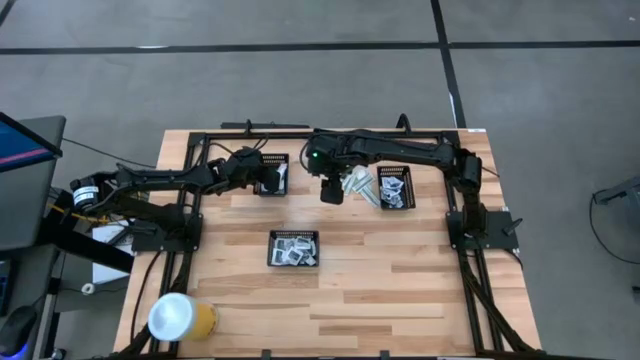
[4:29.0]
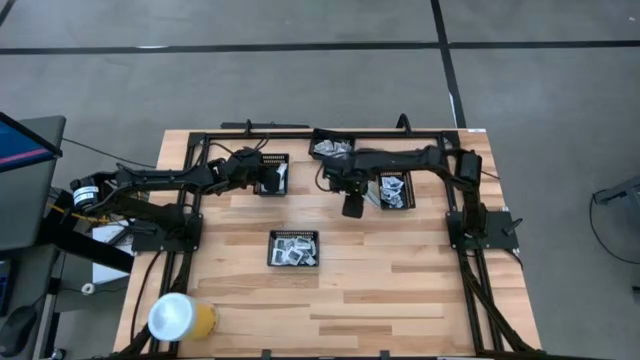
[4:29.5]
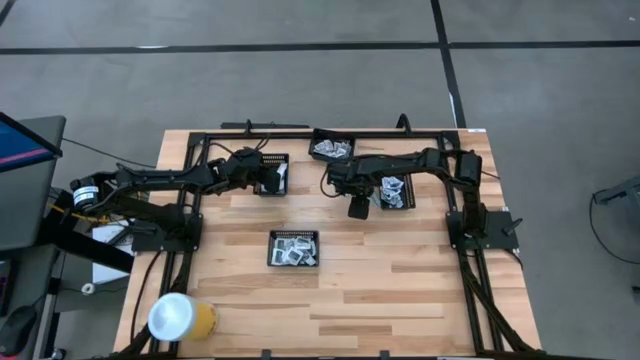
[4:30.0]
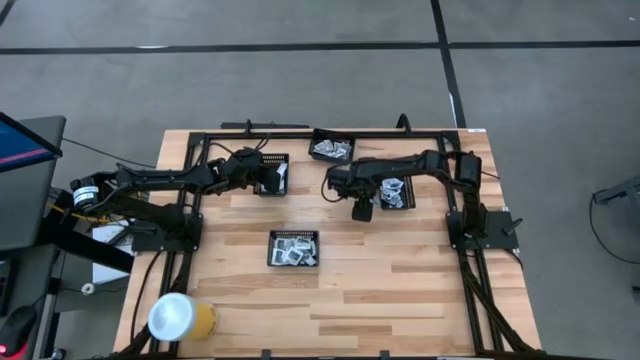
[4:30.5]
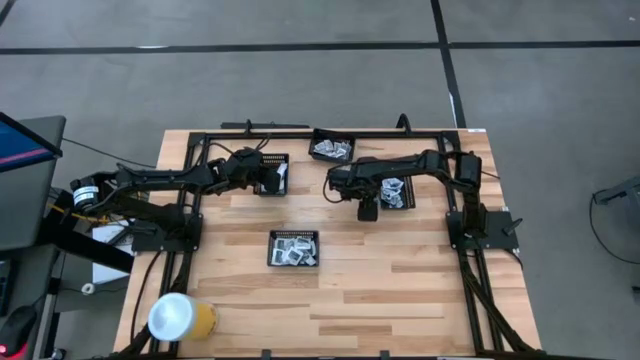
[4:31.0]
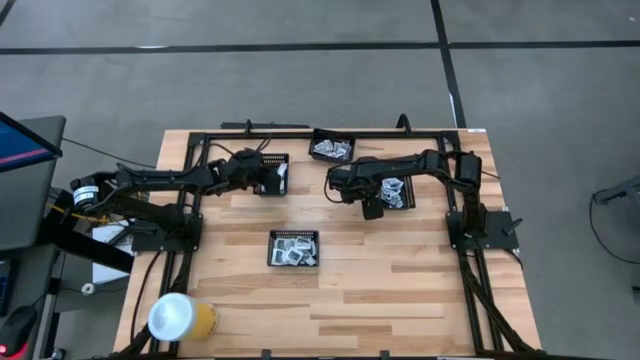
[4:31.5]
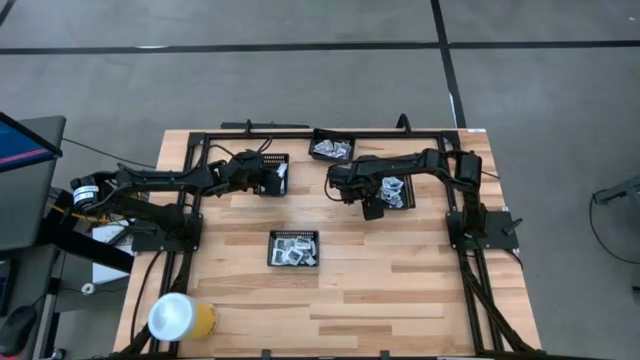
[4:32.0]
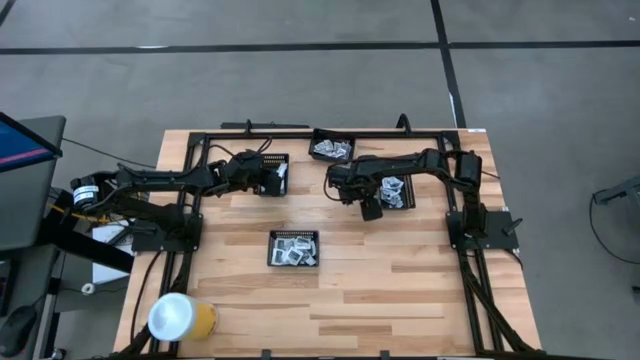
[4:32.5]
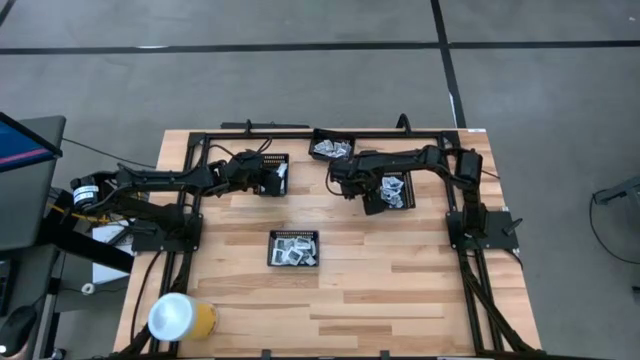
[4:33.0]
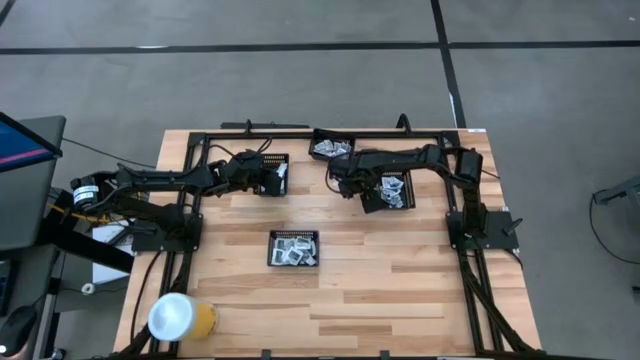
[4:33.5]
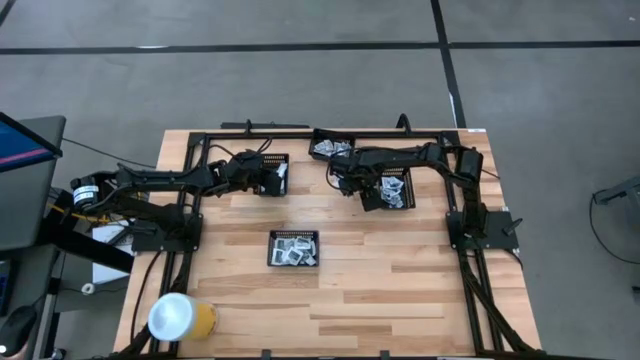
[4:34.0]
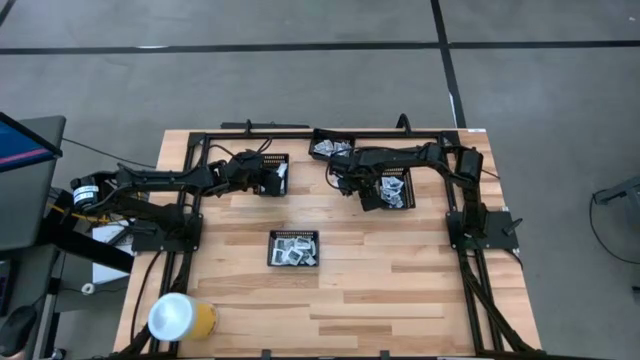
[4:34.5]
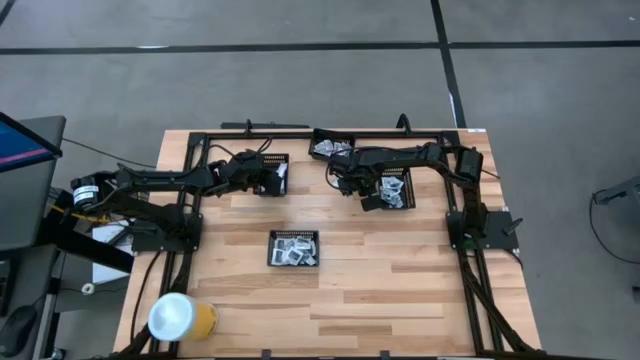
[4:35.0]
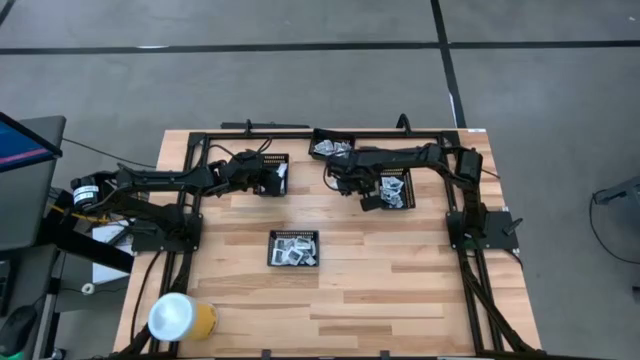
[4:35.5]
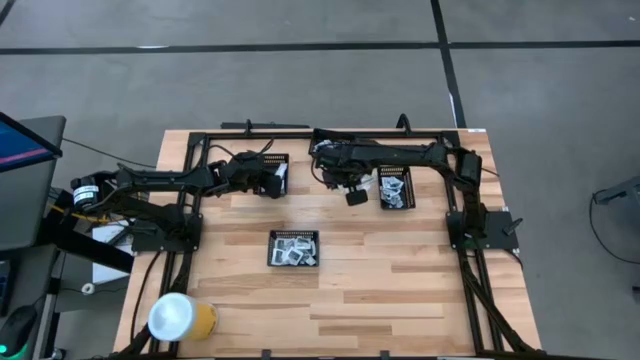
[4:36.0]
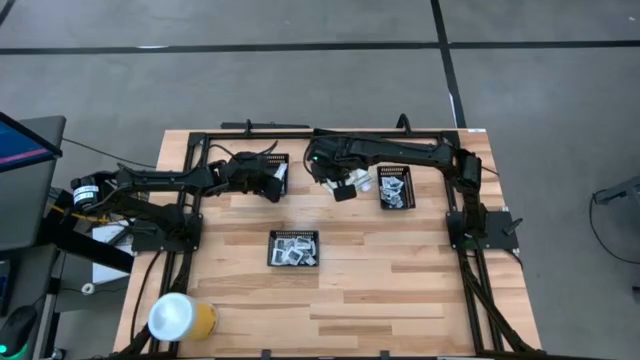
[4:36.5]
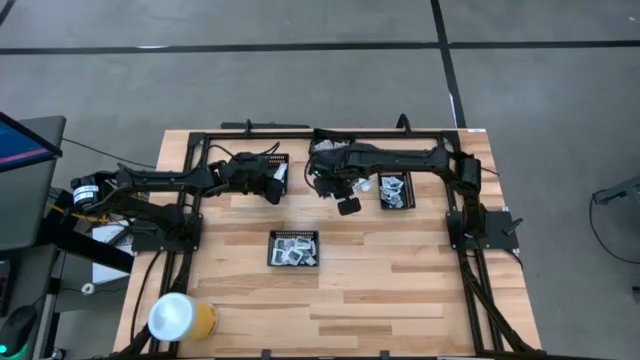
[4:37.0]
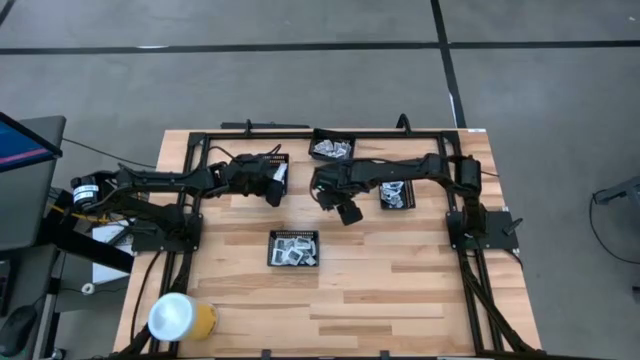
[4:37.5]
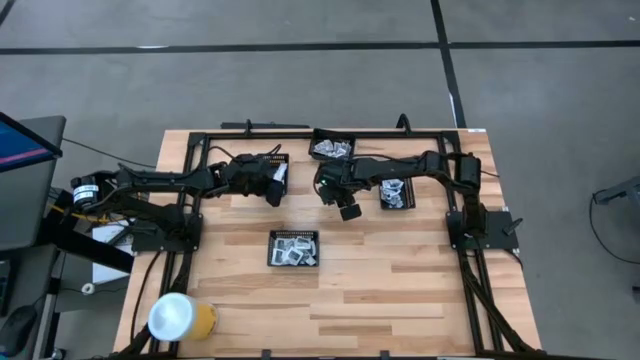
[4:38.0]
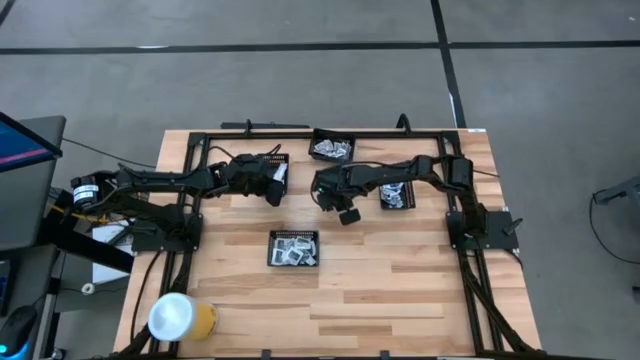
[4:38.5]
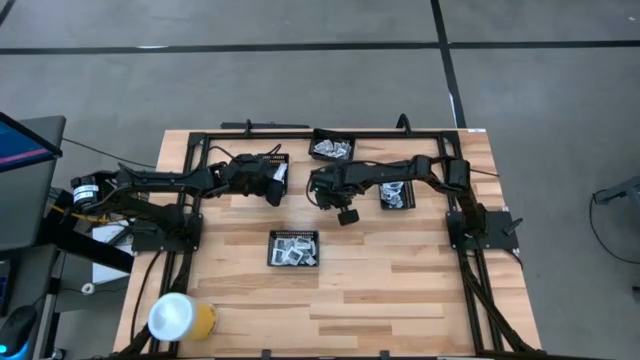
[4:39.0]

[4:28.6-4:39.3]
Task: Pick & Place First Aid Supplies
Put the green bandage into the left black bin

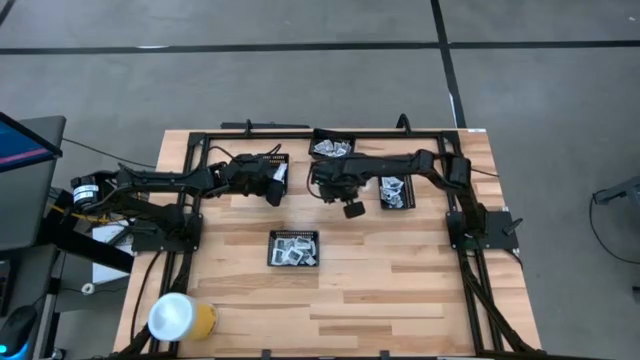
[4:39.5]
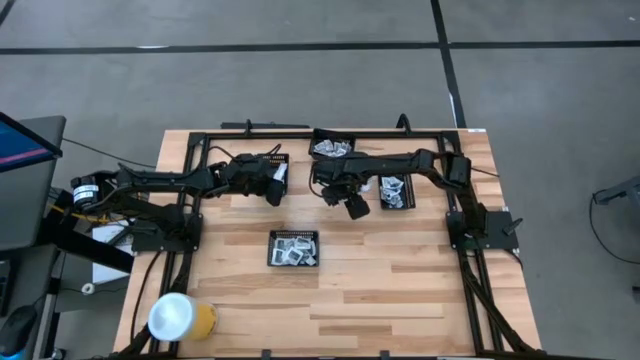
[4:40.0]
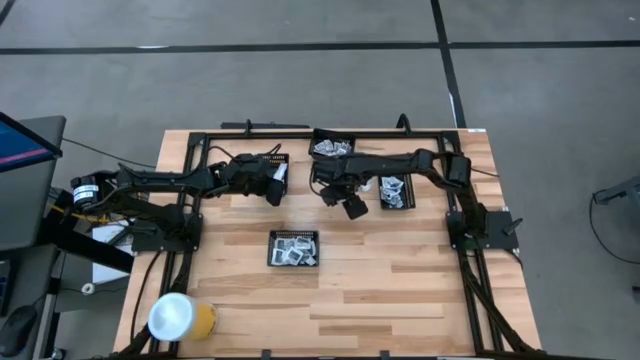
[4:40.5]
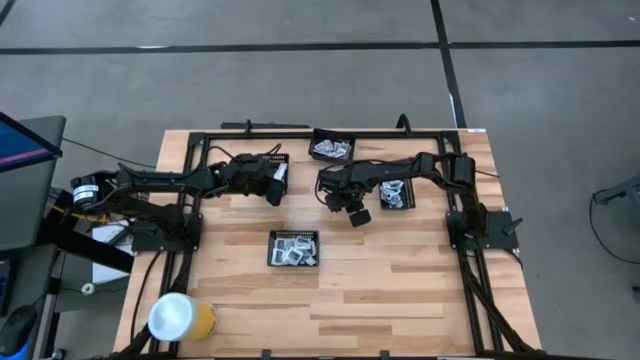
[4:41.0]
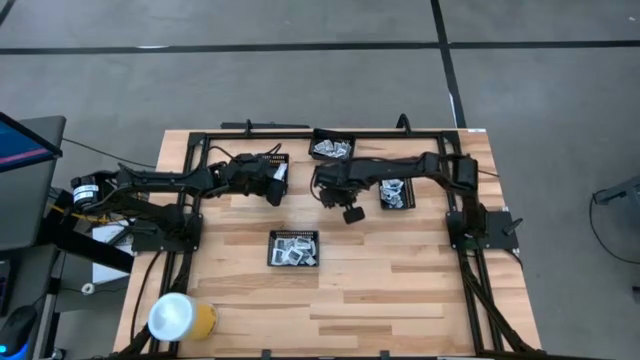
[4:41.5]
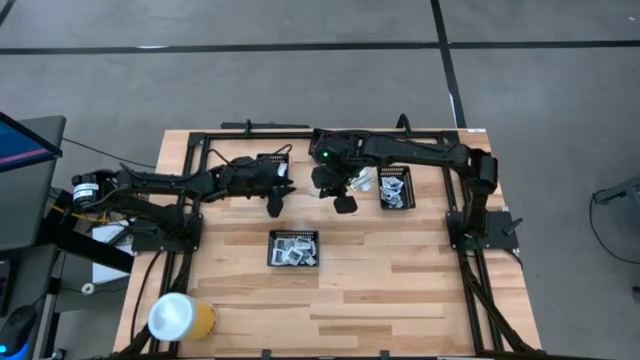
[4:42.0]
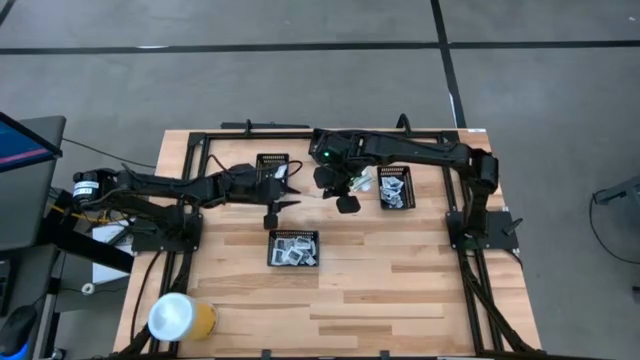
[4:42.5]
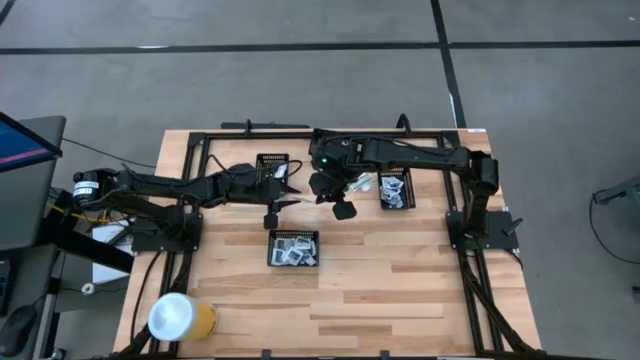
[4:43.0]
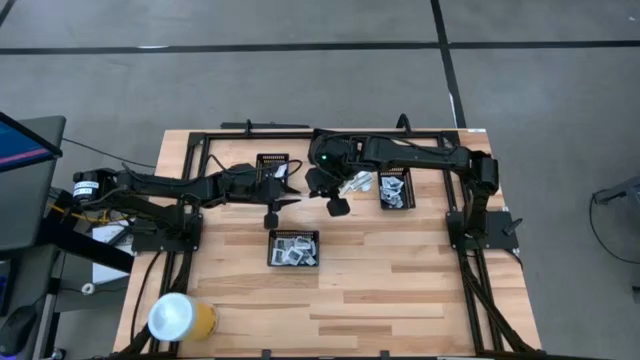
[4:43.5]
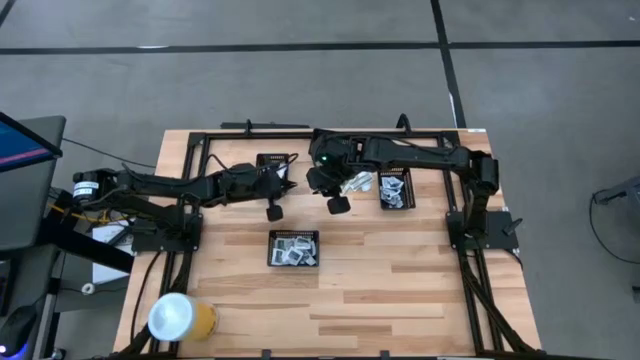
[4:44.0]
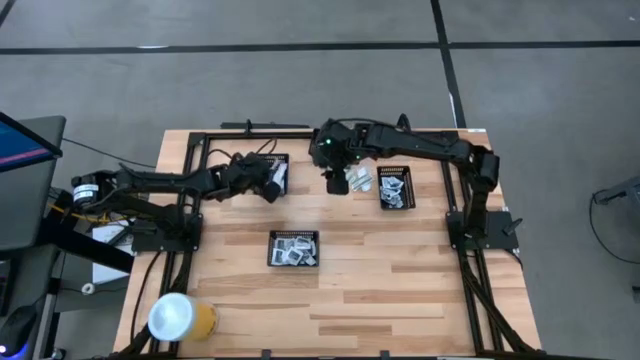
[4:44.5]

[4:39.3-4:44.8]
Put the green bandage into the left black bin

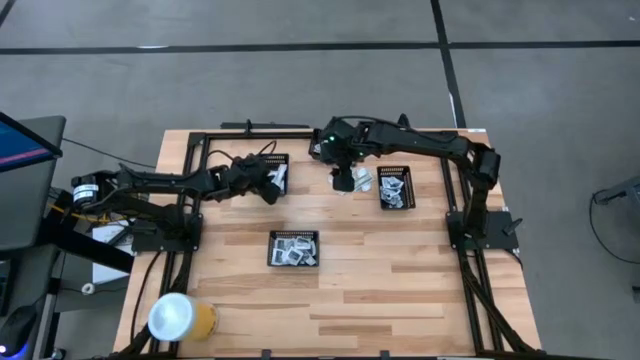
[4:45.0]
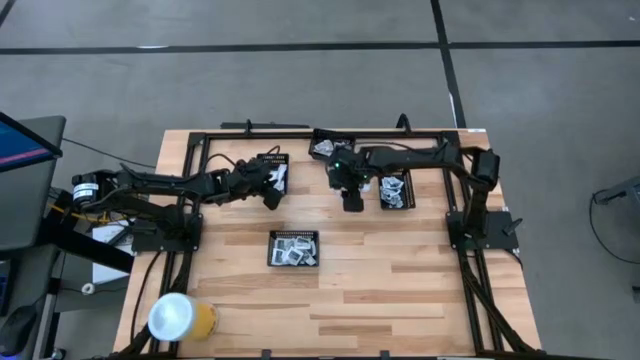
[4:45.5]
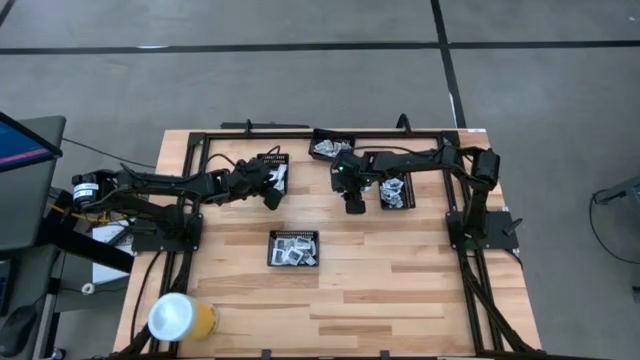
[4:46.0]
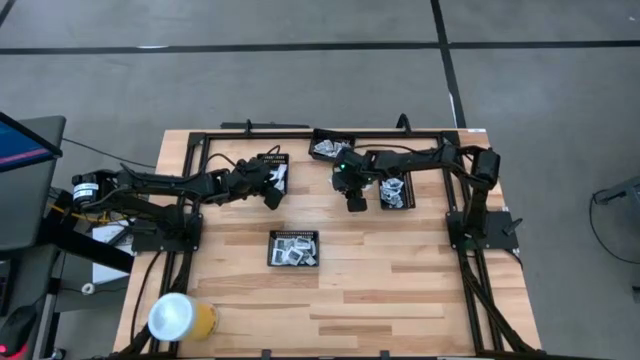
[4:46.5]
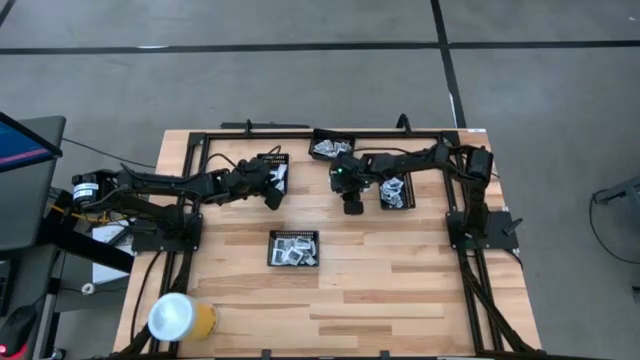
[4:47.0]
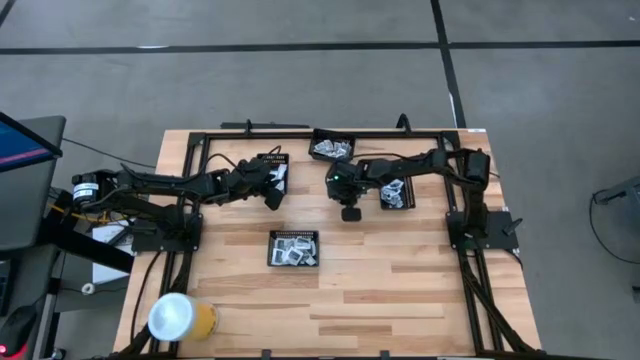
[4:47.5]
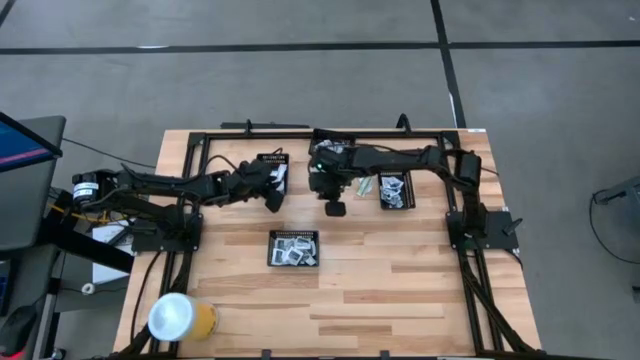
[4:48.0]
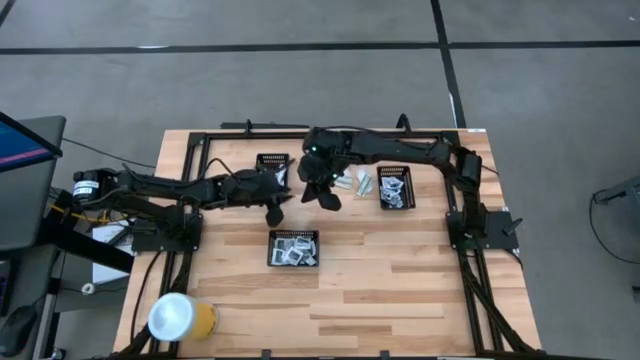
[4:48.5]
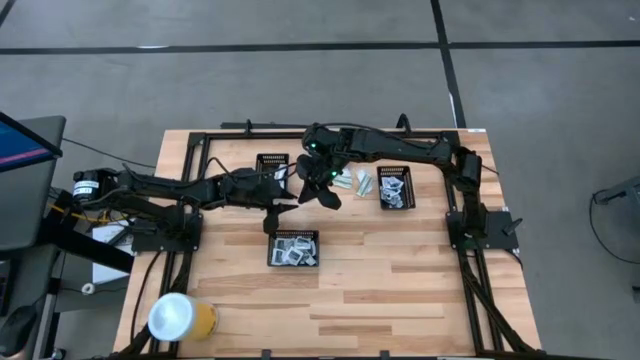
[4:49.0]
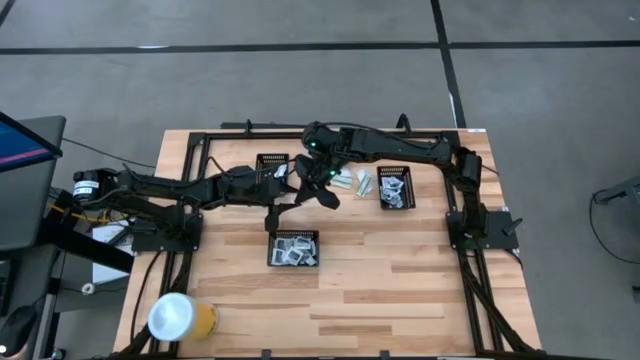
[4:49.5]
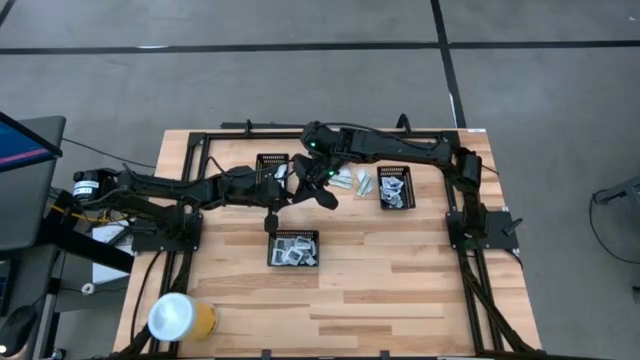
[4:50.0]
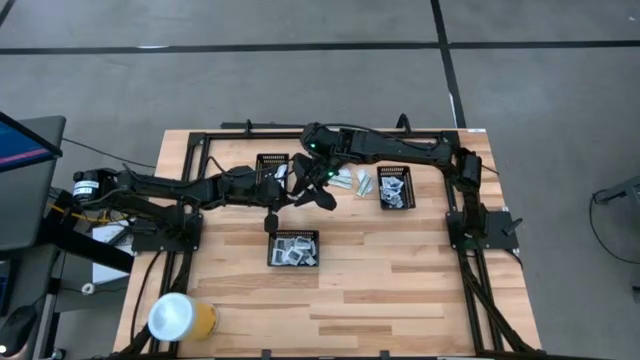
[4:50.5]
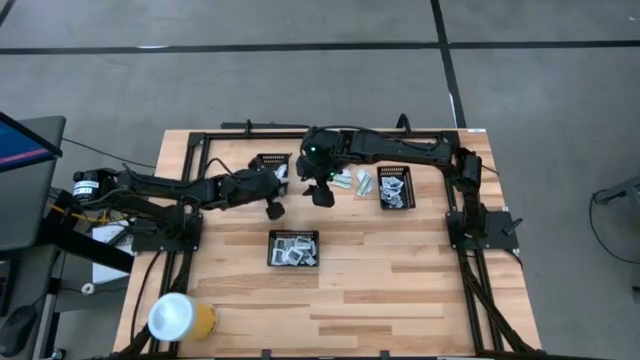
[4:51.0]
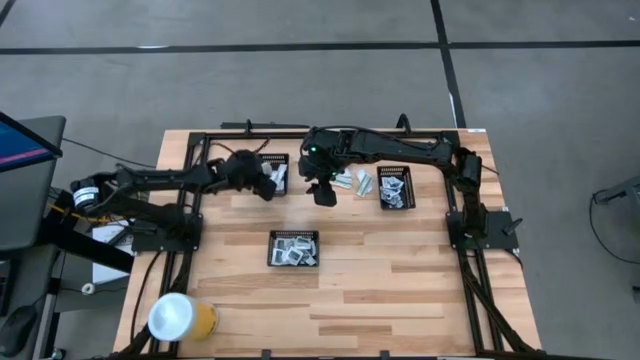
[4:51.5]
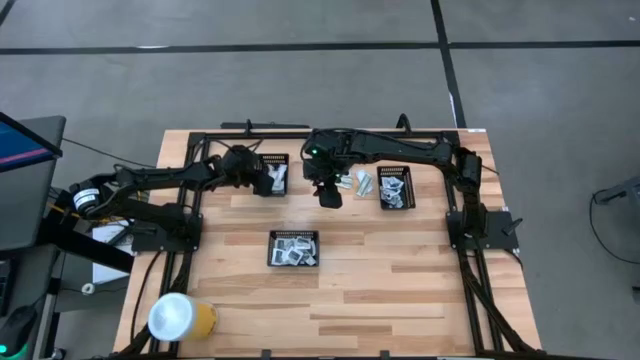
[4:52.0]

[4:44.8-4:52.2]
Put the green bandage into the left black bin
